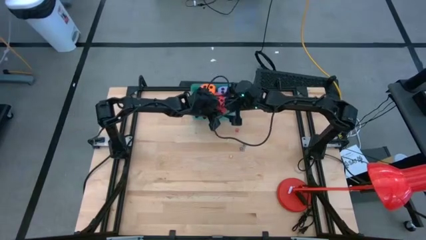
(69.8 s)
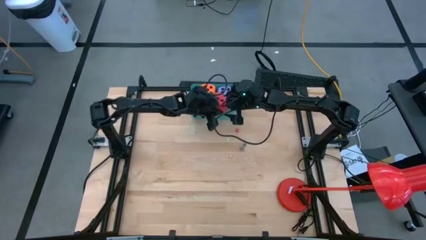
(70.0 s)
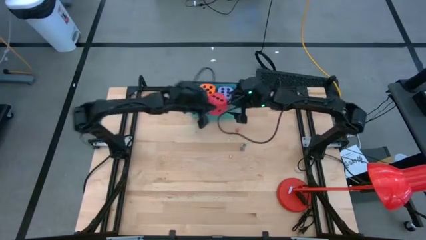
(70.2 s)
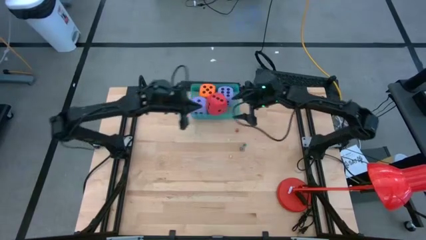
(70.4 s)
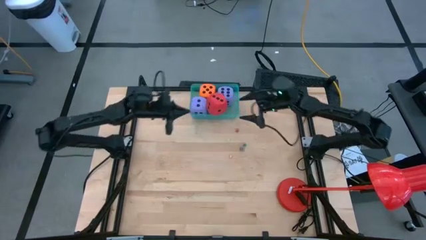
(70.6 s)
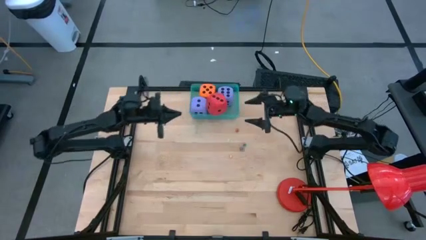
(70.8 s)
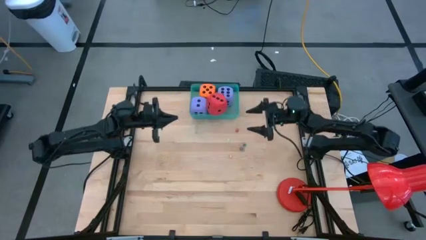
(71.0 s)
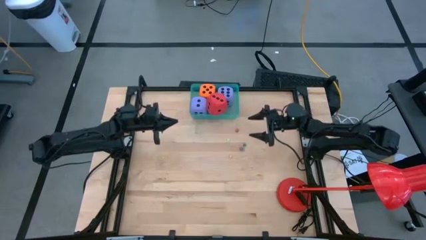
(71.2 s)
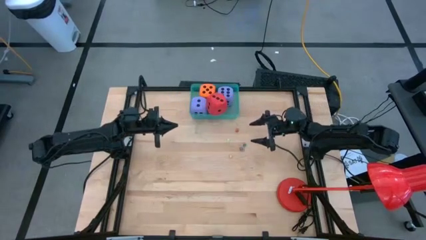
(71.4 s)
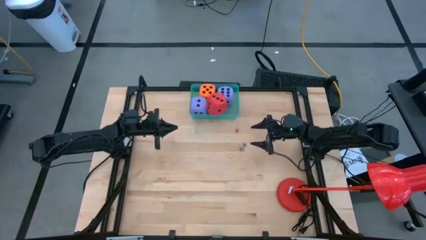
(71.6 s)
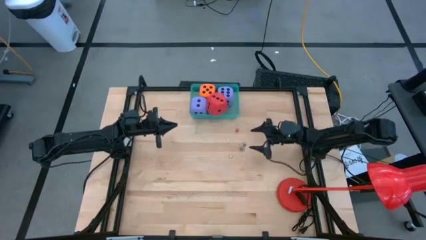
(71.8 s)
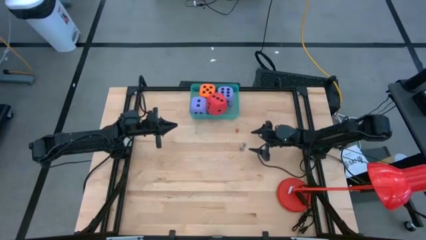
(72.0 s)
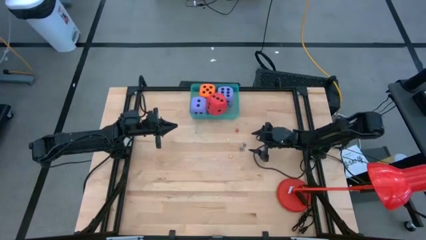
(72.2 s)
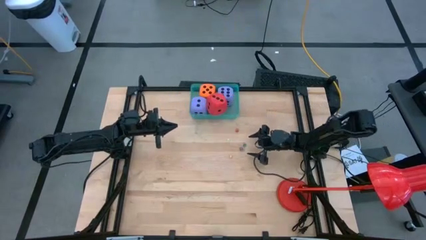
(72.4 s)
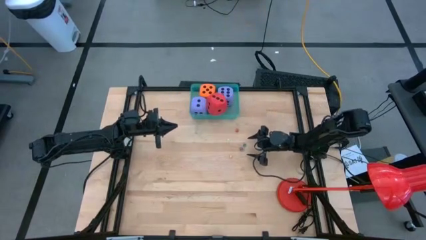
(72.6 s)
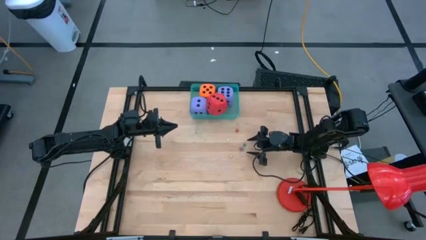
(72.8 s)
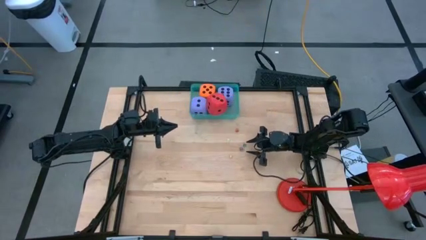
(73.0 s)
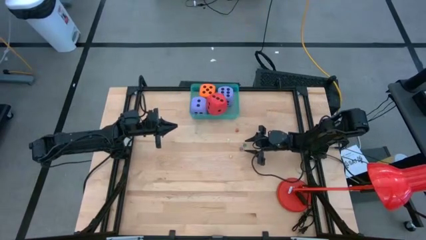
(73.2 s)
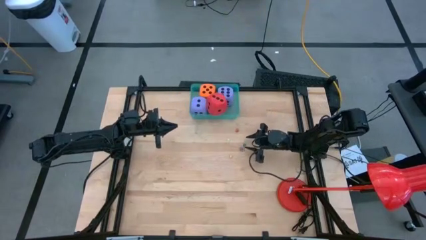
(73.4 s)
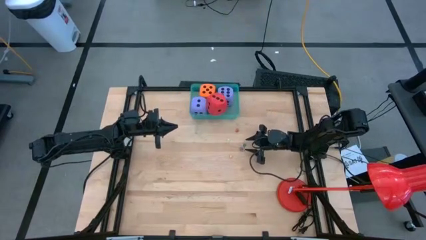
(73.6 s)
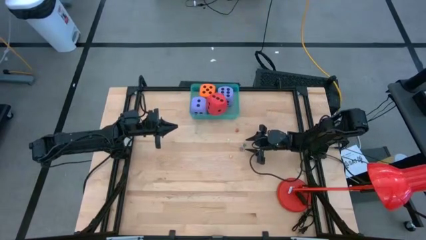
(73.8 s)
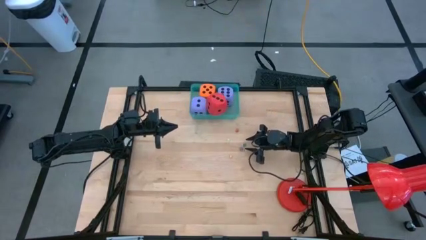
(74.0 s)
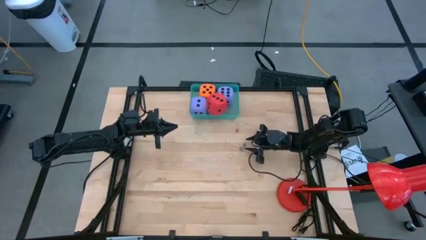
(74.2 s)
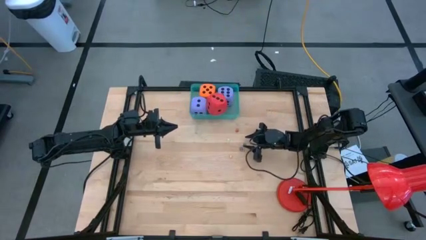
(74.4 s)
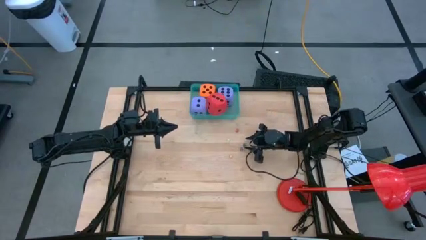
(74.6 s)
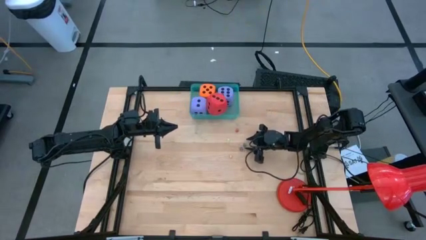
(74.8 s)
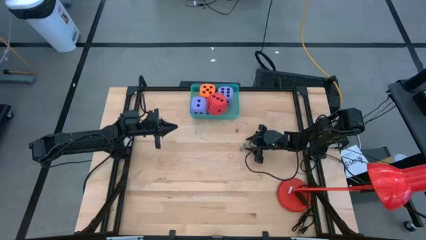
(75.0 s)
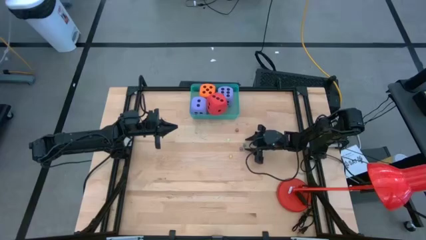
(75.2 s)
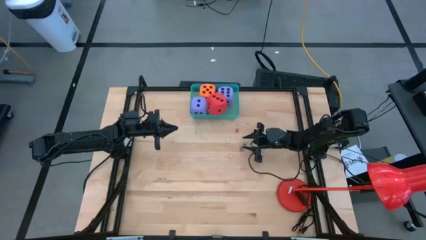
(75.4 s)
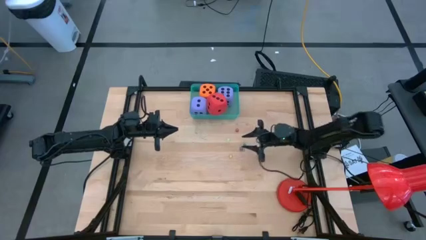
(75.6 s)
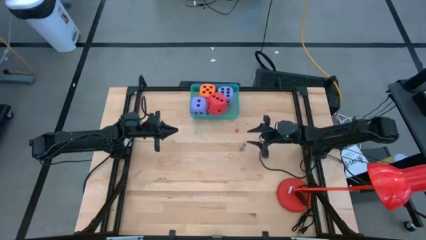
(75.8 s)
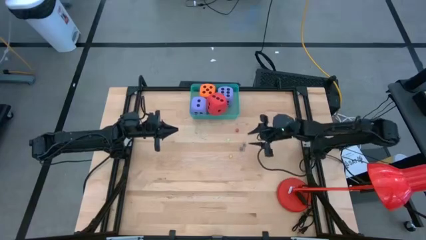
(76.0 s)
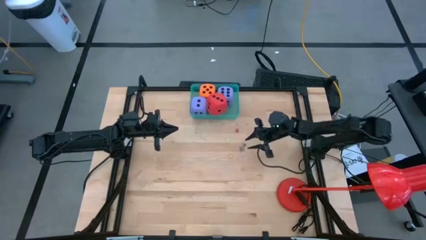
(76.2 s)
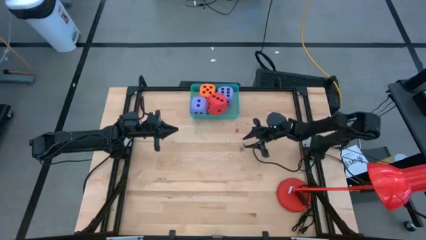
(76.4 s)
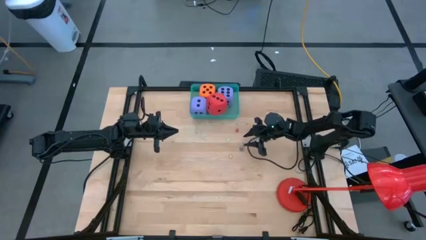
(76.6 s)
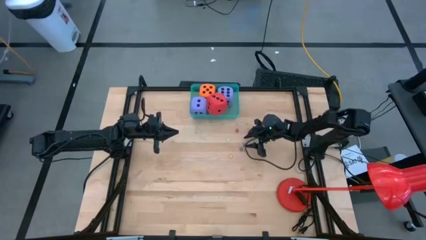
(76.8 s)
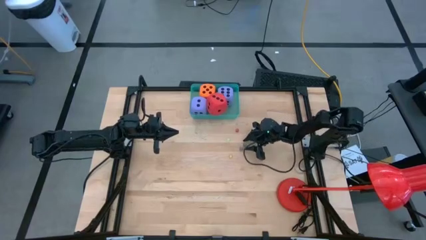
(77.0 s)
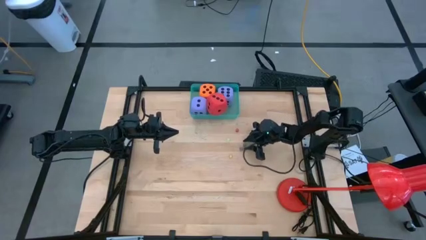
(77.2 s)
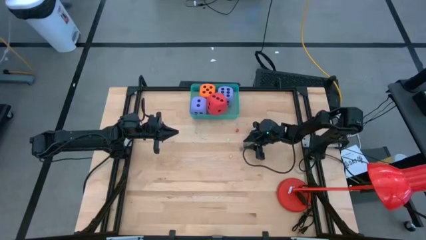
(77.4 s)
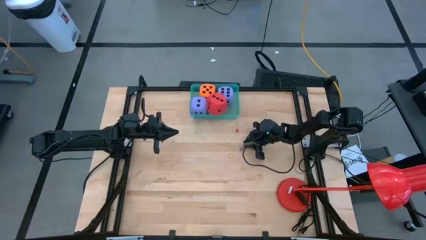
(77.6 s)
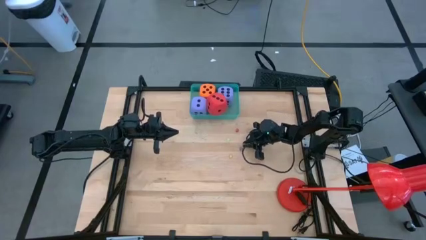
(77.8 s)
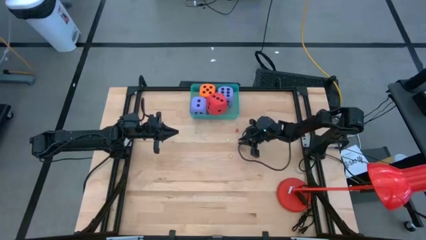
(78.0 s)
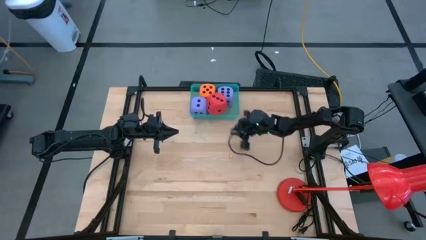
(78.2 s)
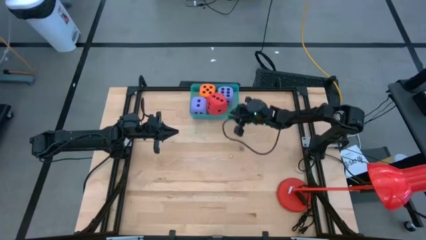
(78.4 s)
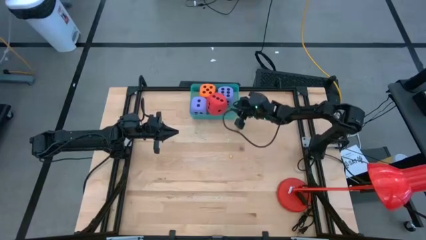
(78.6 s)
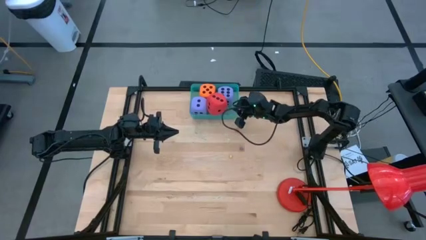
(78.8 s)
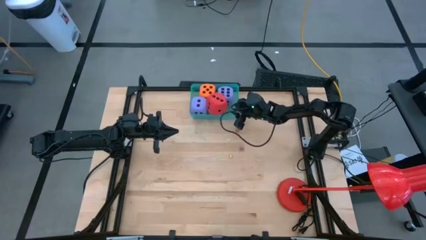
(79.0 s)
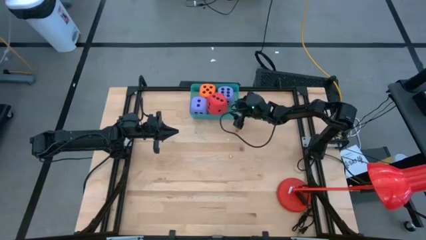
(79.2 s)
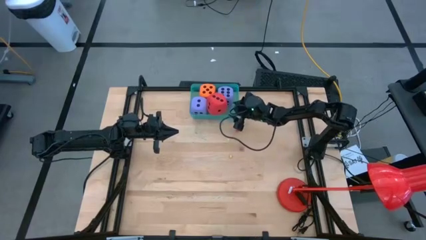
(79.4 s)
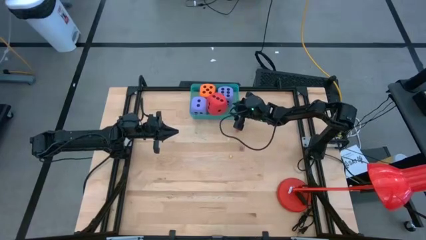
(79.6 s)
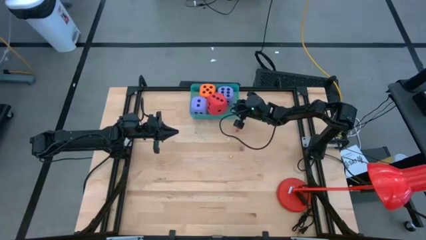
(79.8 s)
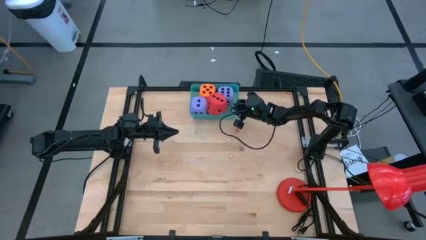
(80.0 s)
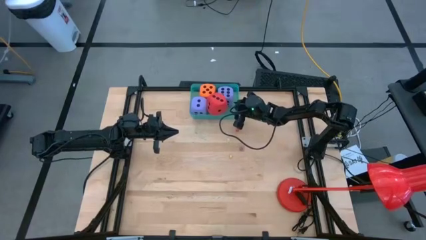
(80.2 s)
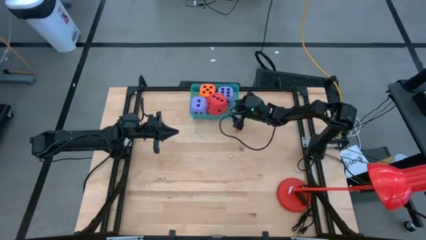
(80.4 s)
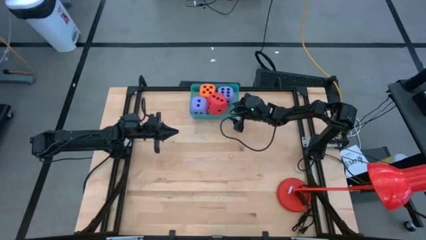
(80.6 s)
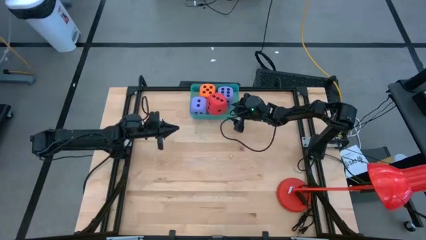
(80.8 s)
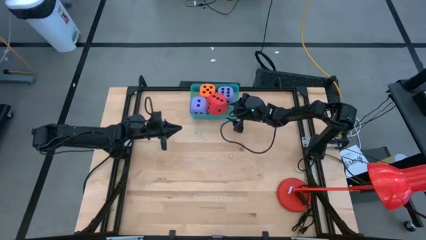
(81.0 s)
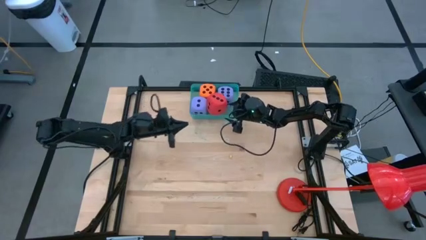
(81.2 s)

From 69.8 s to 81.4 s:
Task: Pick & Place Dice
Put the green dice into the green bin

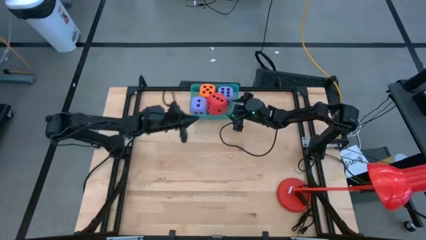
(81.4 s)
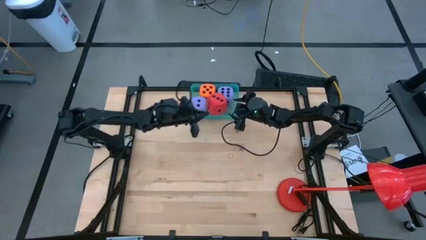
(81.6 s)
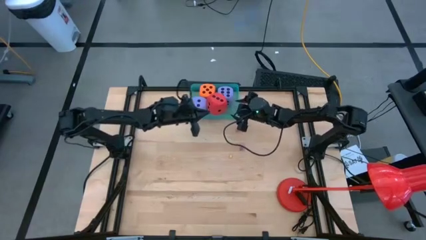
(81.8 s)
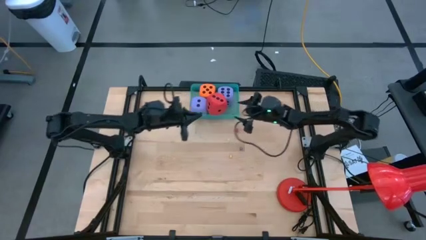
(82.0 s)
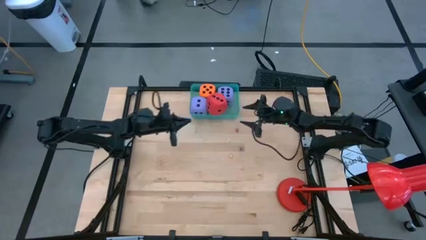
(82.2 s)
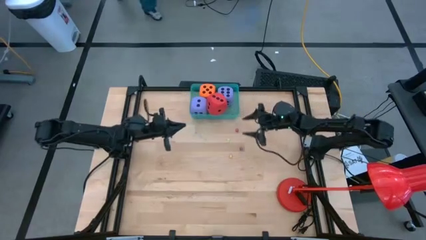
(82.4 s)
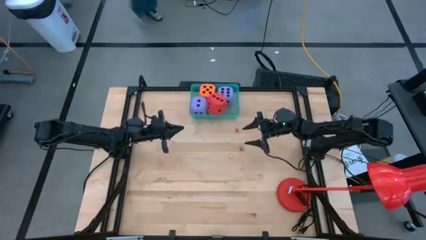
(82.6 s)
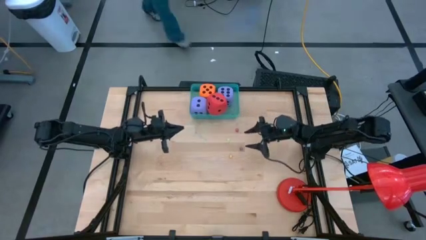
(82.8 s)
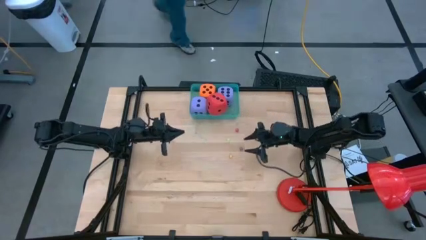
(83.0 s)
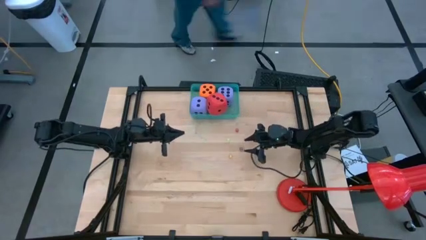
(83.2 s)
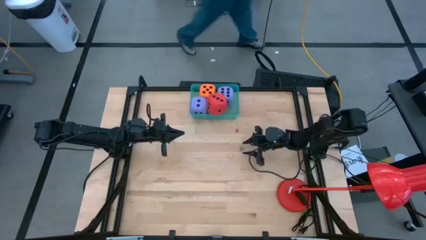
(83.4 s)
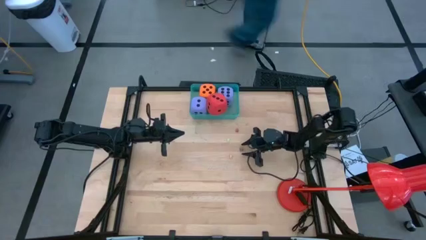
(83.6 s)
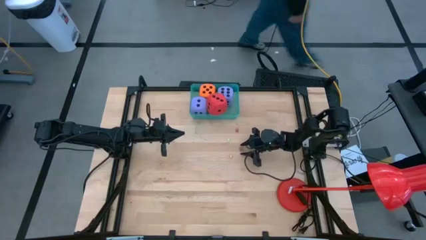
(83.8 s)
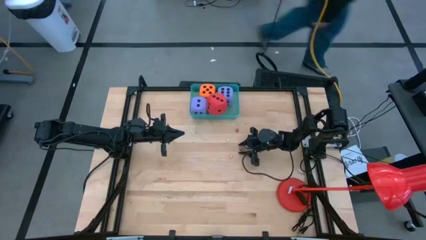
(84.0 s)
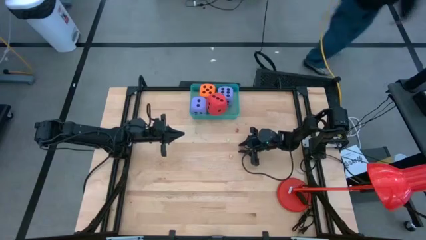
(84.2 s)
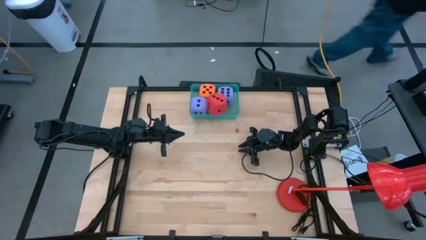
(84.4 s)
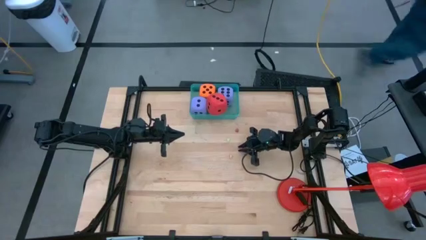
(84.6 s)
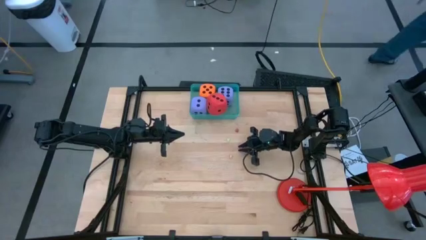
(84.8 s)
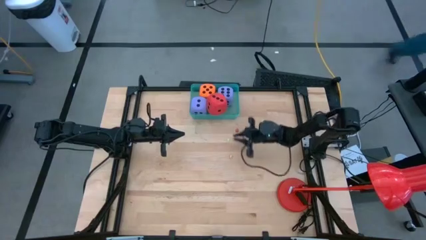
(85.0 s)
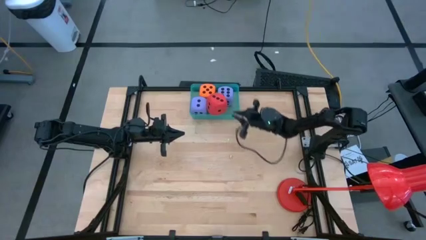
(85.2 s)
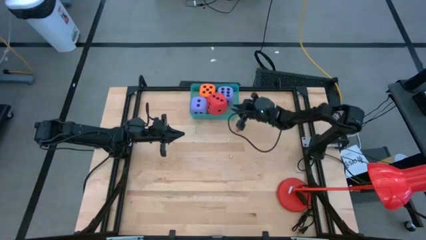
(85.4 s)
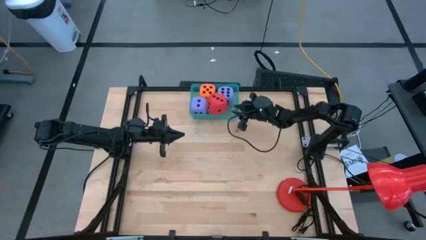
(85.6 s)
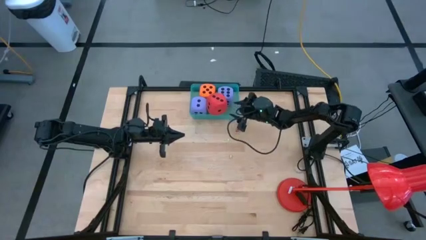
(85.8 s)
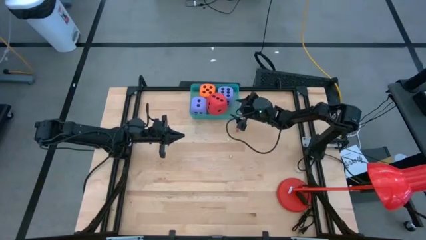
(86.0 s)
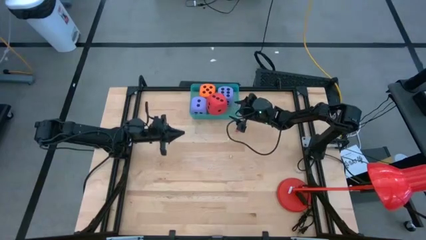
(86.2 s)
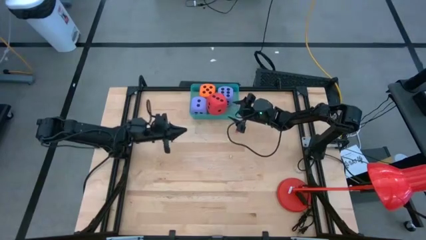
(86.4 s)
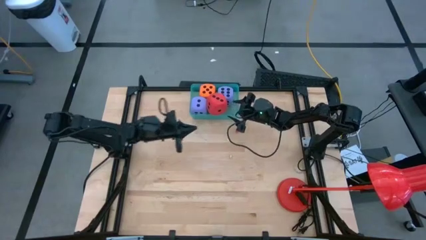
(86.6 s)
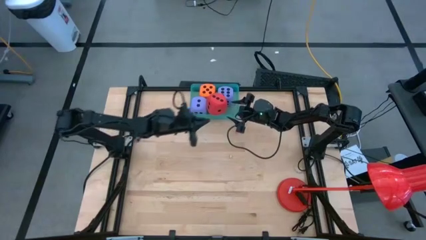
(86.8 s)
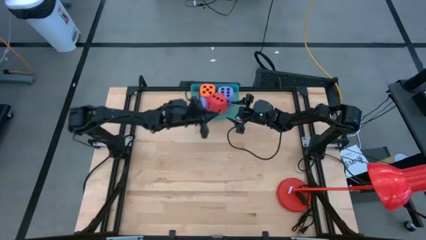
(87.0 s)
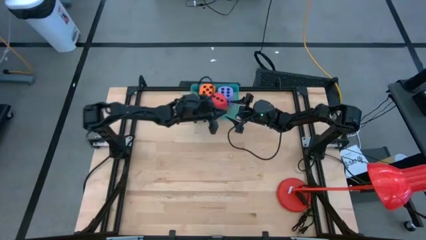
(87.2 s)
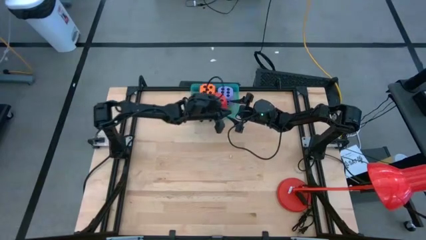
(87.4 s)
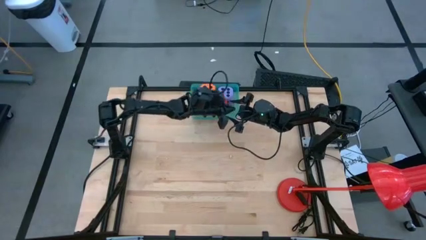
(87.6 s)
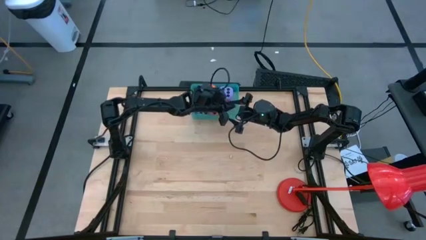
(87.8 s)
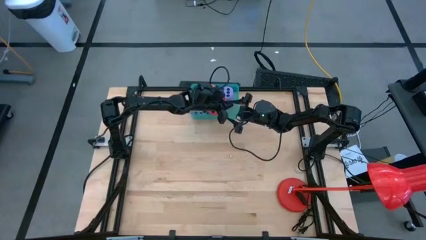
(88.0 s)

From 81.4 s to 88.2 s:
Put the violet dice into the green bin
